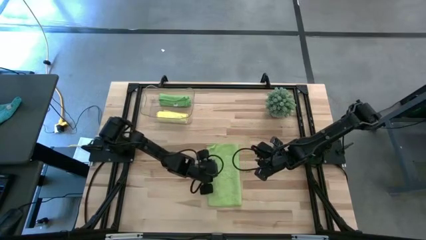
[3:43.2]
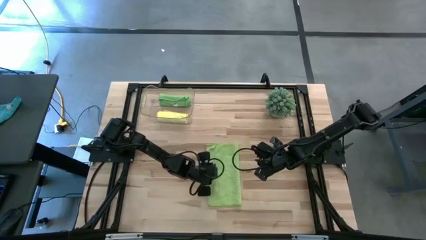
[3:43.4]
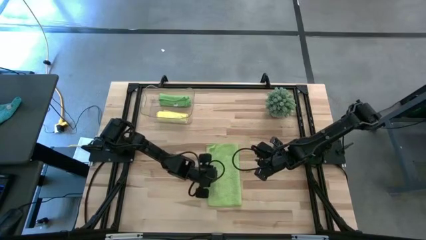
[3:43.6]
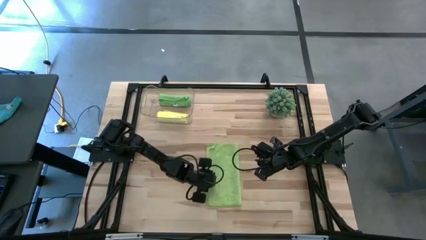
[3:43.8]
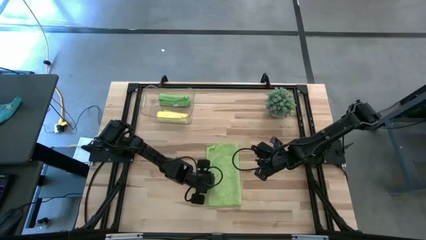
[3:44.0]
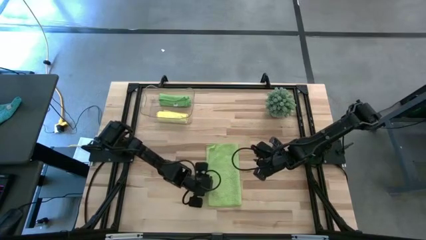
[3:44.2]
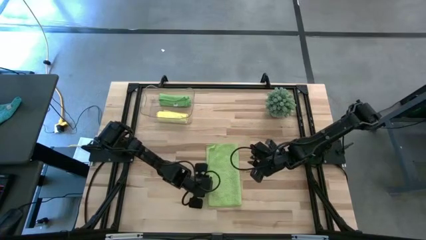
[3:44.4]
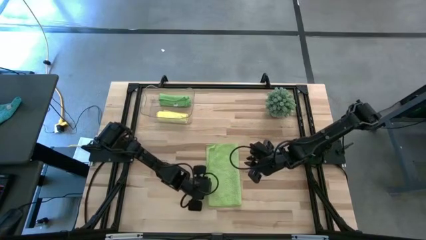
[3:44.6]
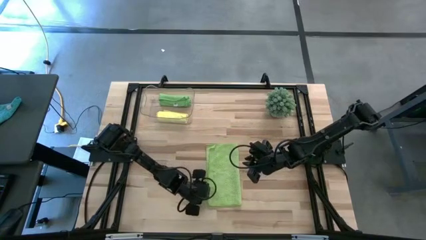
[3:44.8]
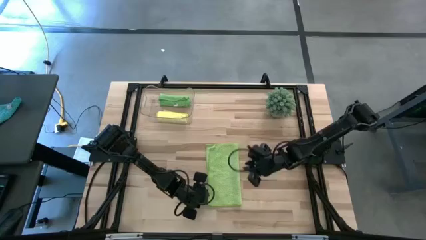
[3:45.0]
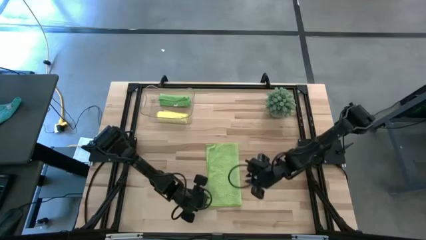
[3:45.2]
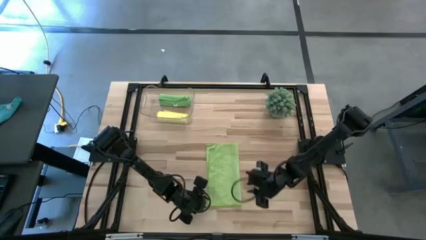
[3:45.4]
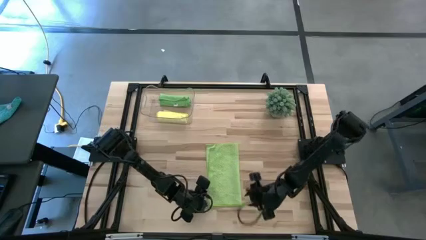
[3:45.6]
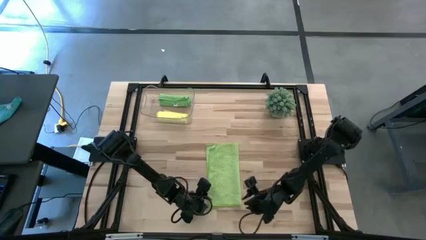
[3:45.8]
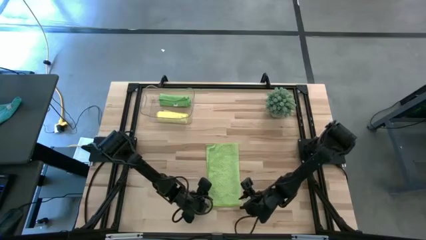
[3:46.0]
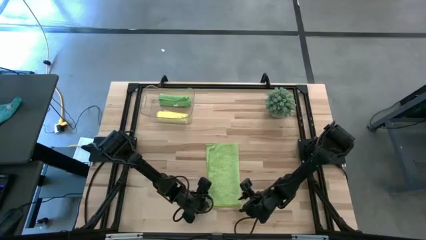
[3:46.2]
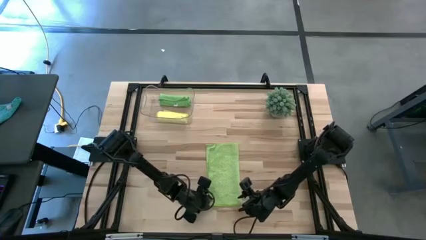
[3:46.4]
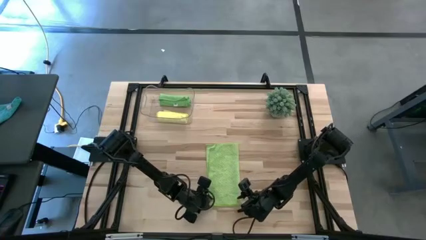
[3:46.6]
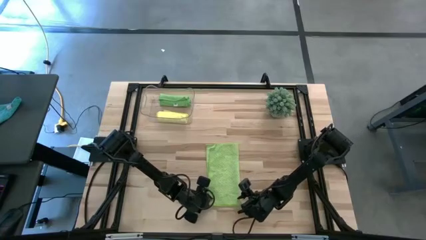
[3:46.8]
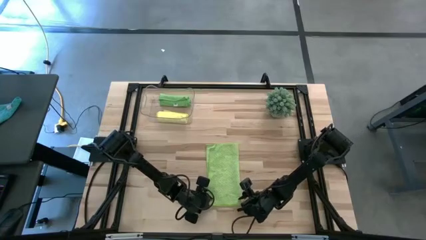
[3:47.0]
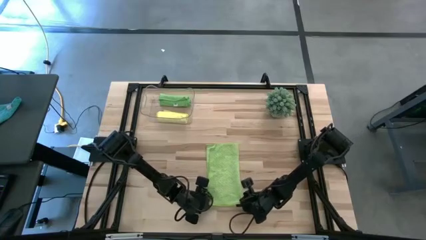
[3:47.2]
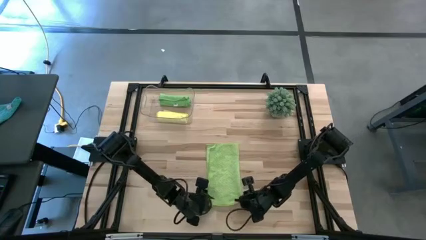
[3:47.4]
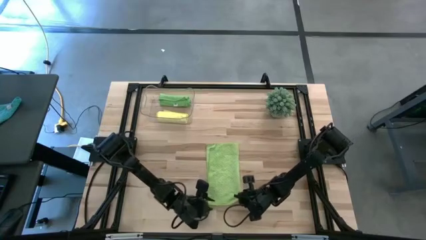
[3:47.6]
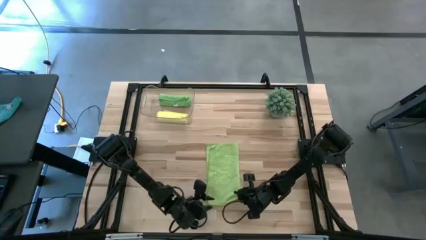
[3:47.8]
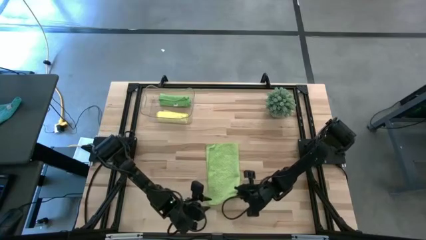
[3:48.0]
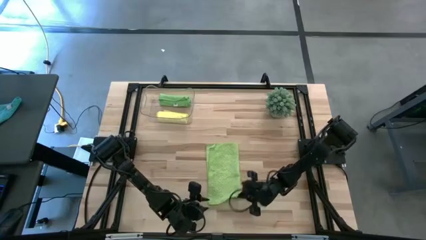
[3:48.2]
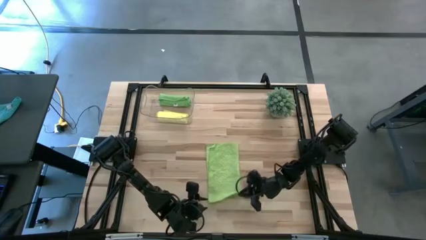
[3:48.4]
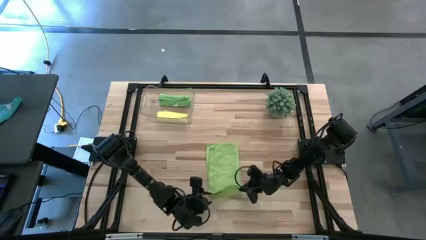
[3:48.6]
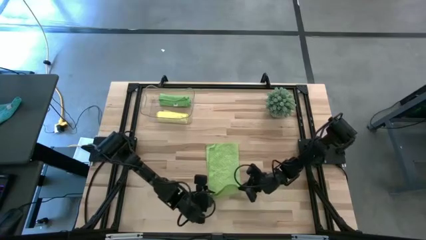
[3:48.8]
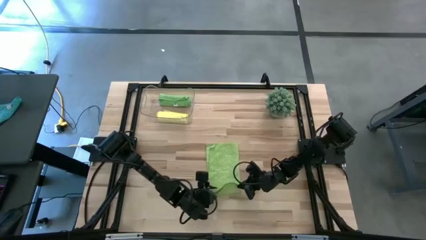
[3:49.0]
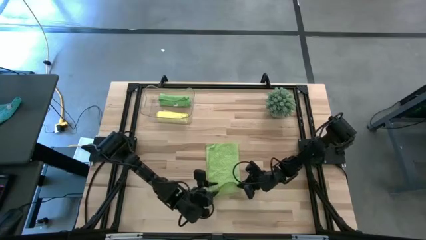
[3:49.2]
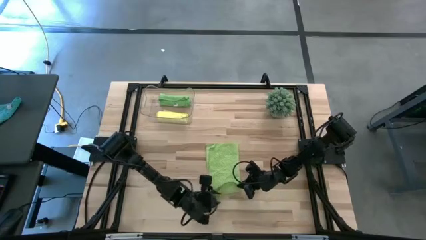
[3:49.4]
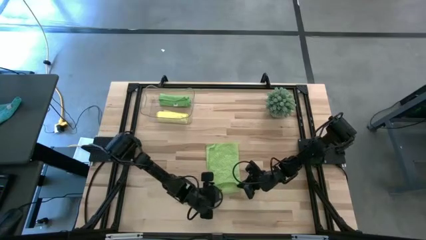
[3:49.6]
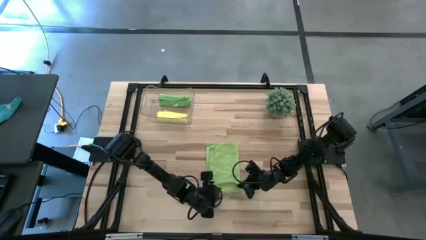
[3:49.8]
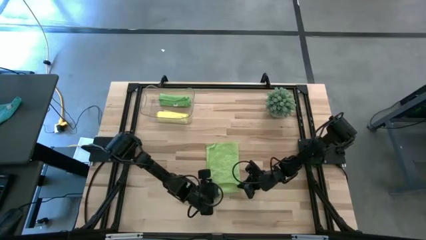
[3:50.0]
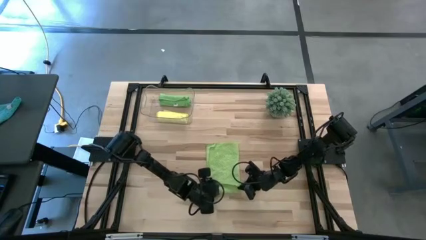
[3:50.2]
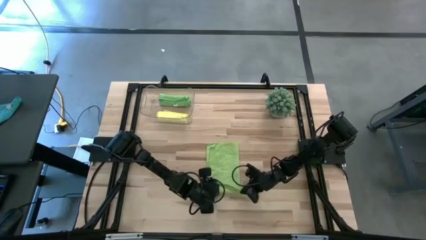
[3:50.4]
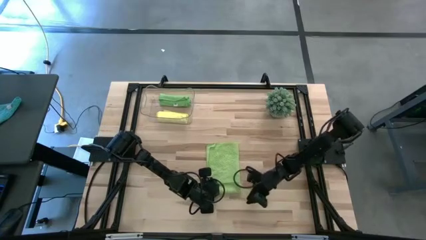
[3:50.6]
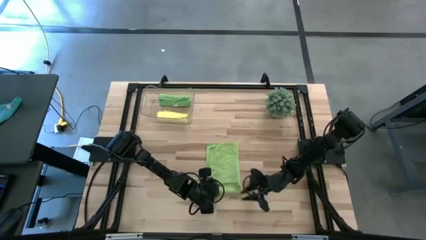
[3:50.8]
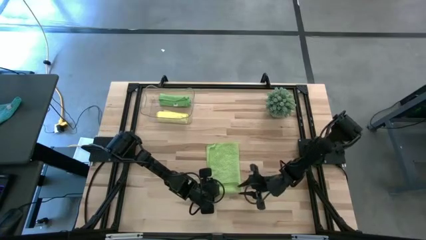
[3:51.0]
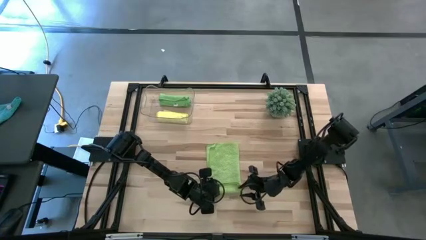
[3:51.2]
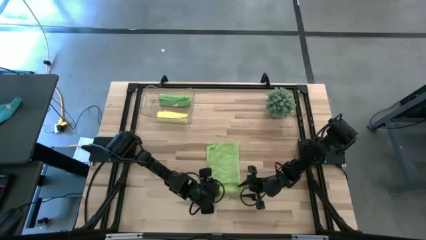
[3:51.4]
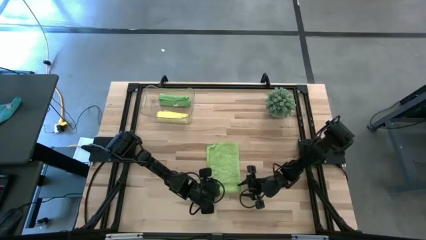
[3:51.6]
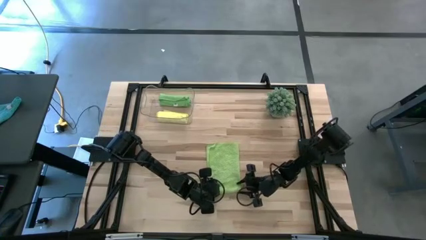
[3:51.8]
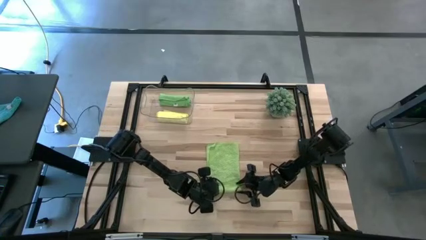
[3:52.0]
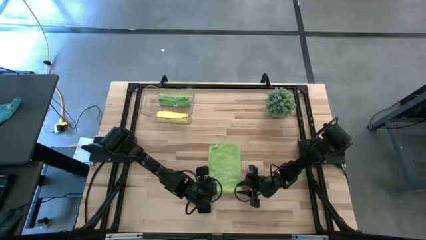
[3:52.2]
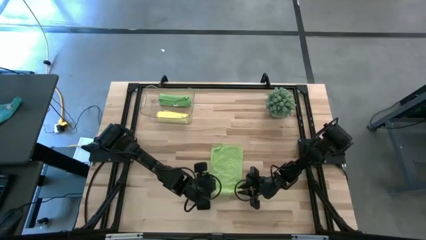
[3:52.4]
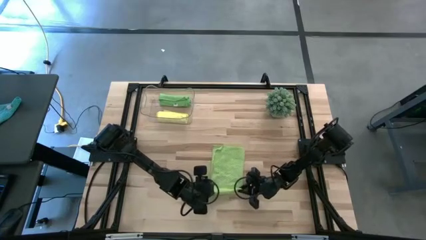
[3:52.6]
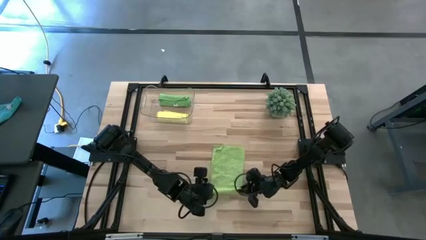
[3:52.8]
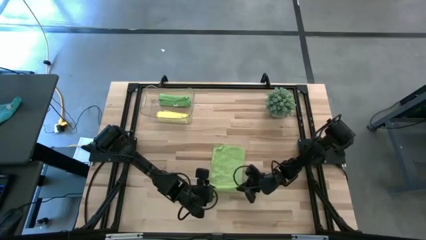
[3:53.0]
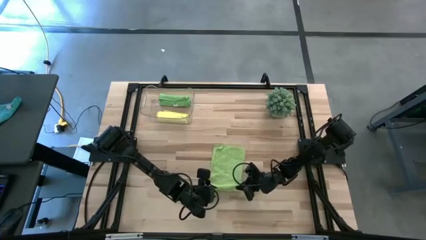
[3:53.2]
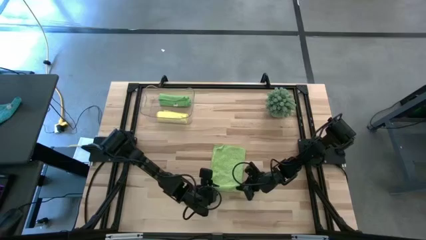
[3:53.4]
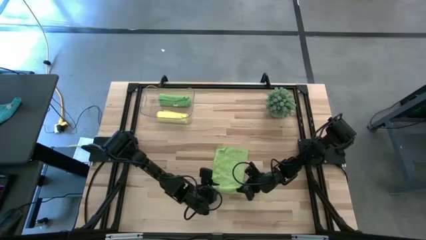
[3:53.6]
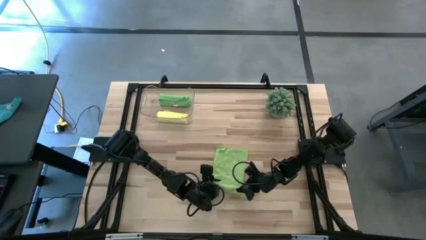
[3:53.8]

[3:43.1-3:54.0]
Task: Roll microfiber towels into tight, uniform cylinder then place into a basket
Roll the light green microfiber cloth

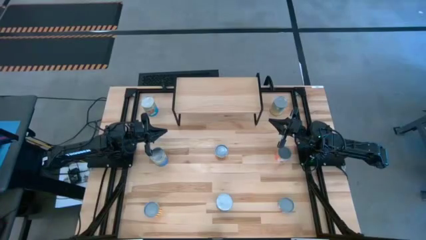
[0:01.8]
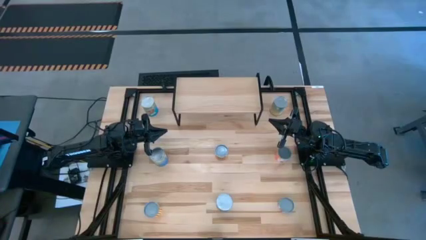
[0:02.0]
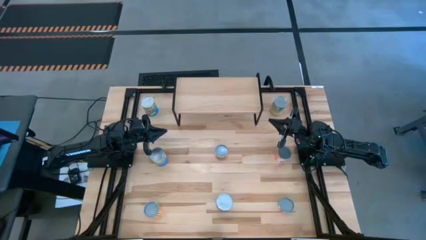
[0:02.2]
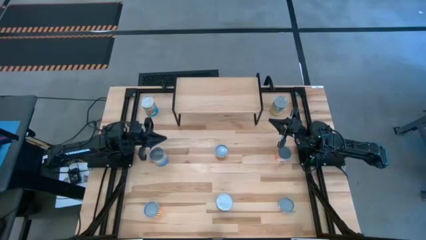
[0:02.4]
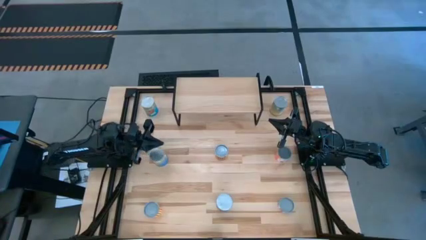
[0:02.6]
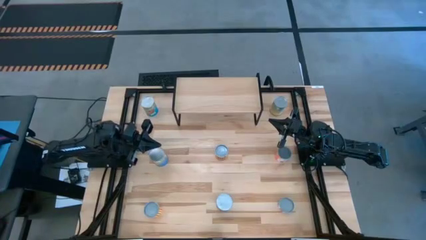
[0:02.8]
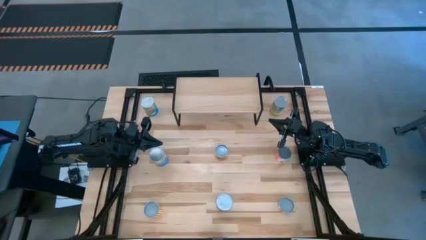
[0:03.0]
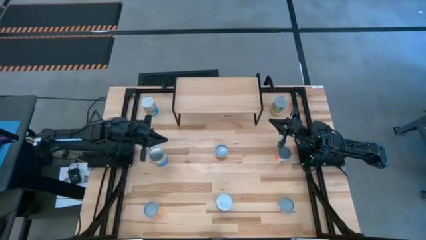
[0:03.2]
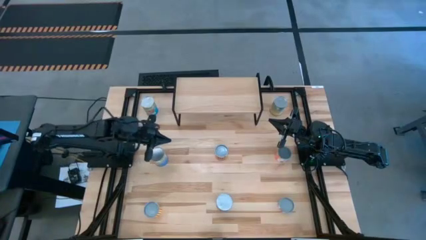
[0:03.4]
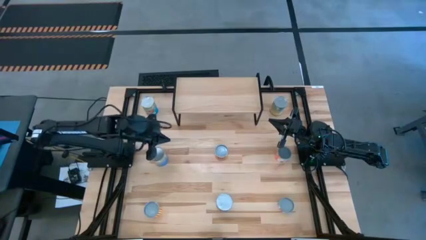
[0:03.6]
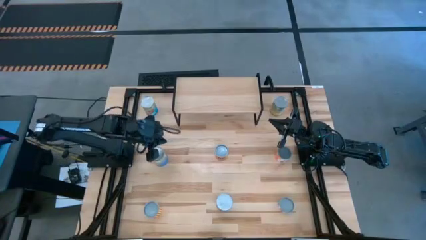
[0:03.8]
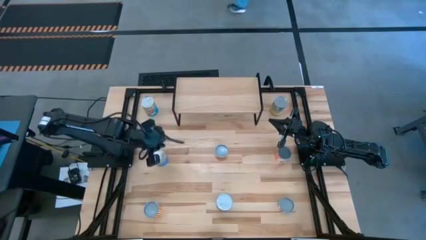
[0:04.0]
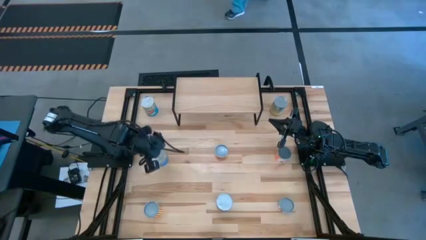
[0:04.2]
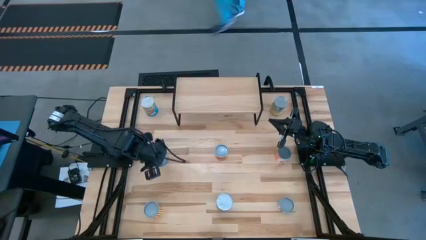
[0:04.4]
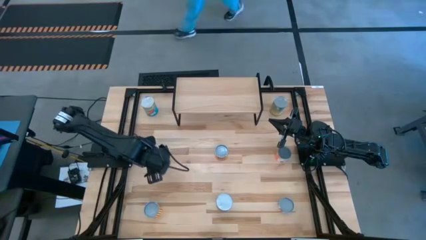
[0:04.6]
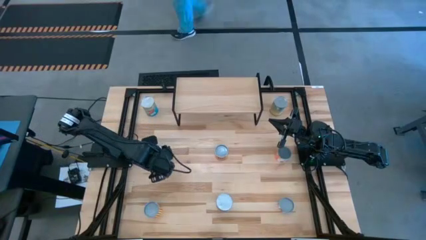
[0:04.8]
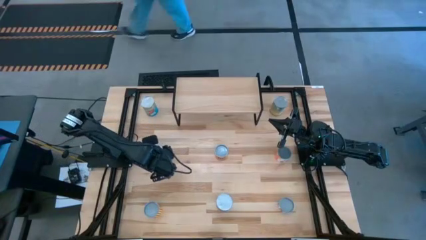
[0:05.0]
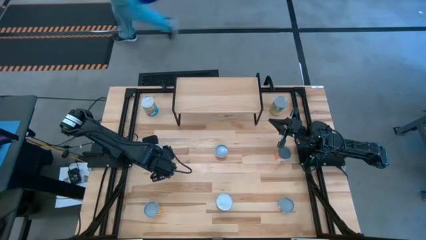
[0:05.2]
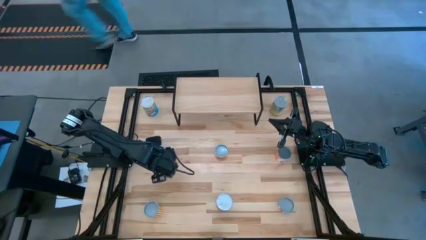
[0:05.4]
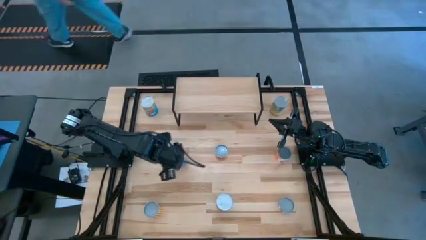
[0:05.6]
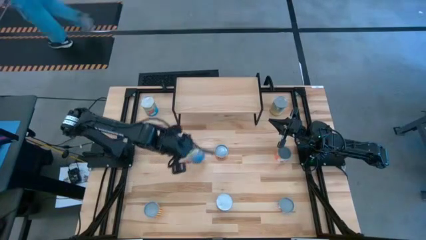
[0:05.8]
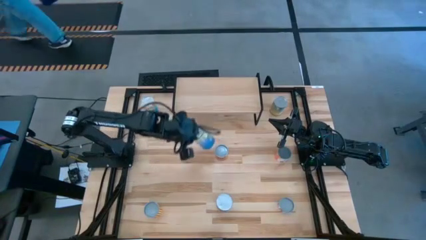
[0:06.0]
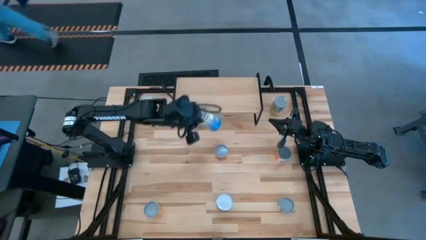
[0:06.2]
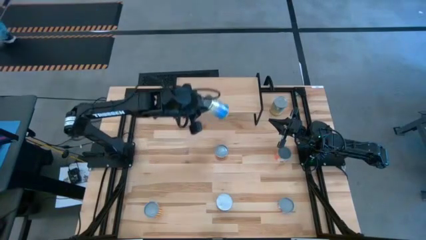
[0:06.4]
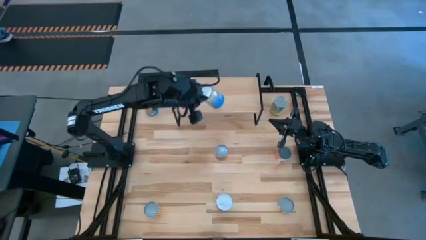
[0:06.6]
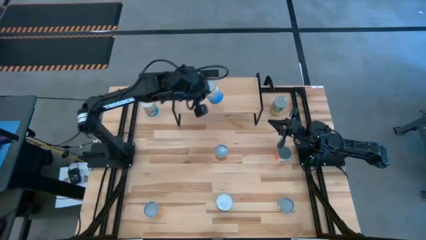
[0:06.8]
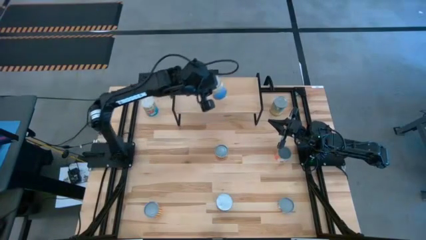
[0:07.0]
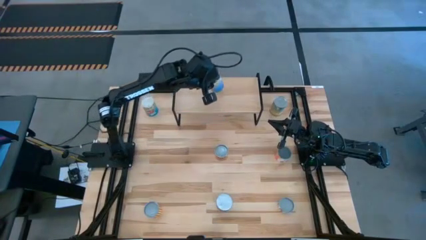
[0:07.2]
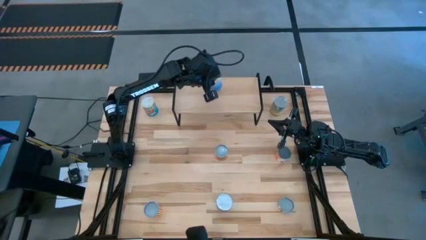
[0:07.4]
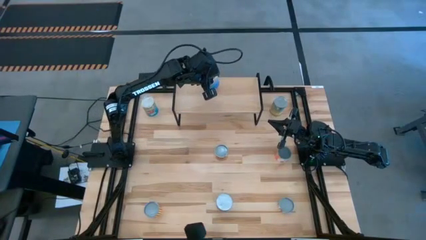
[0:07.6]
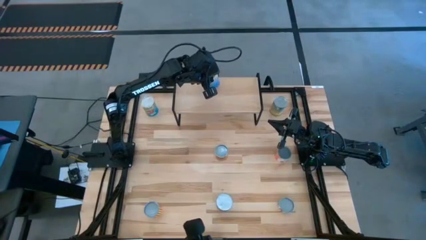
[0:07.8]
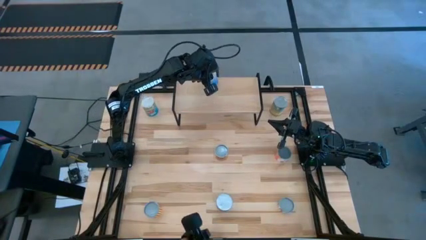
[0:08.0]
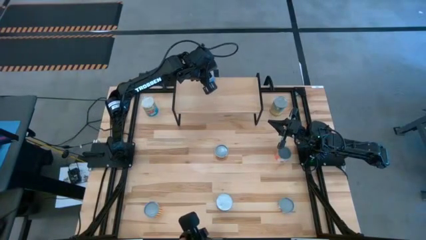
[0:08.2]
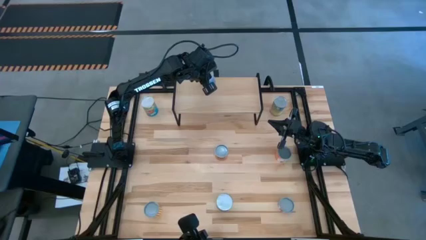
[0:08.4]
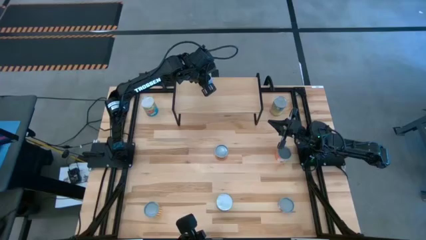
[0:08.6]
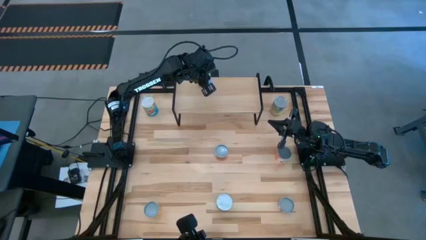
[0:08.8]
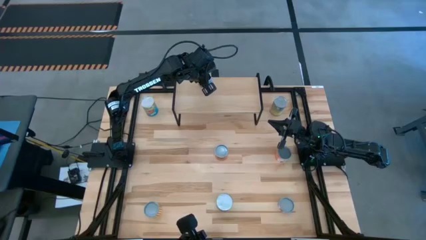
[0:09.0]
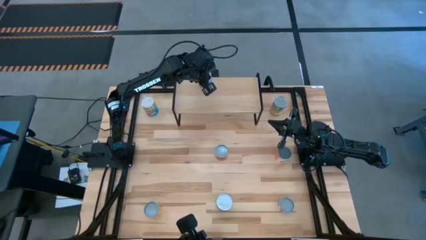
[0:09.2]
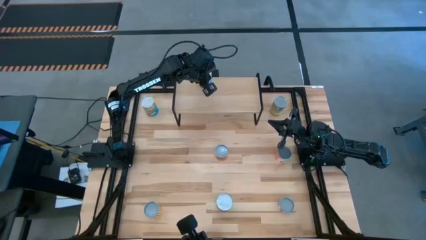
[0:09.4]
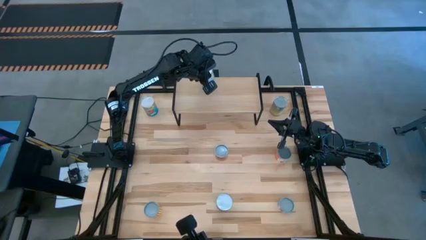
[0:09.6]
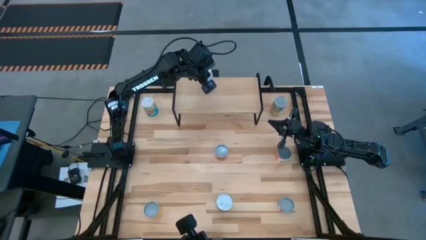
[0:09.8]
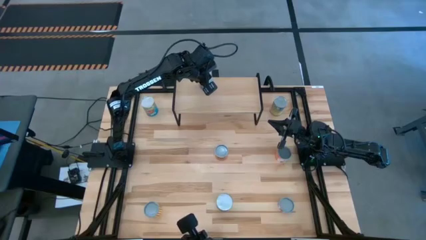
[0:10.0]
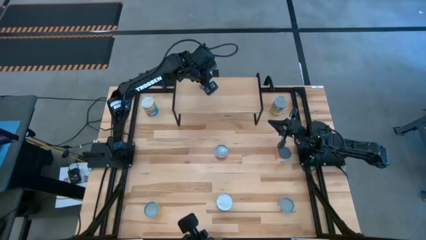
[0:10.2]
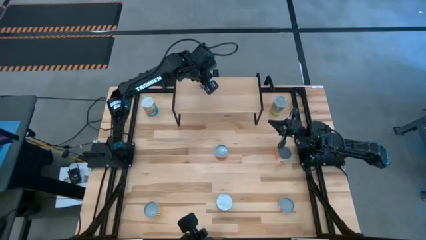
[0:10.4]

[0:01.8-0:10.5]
Task: Pick and place cans onto a shelf
Put the canned peas on the shelf
